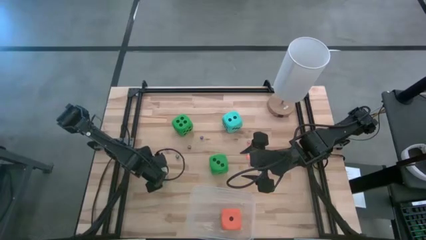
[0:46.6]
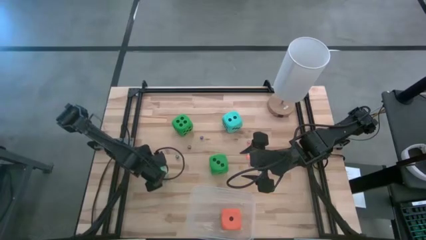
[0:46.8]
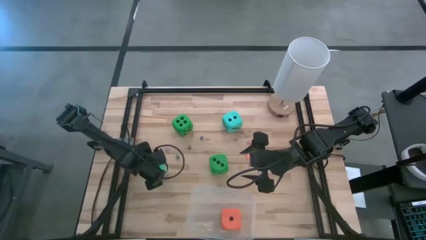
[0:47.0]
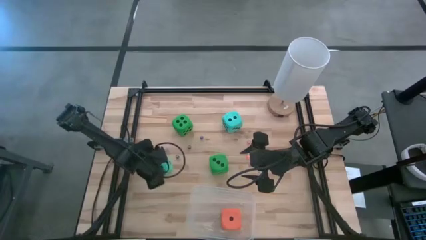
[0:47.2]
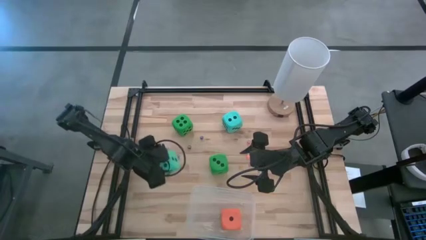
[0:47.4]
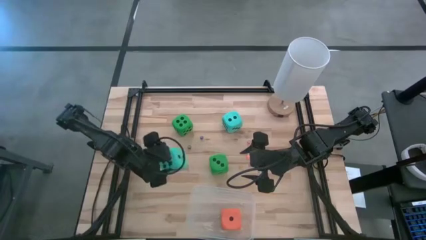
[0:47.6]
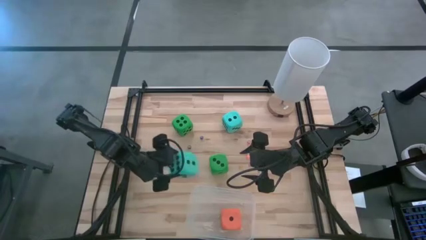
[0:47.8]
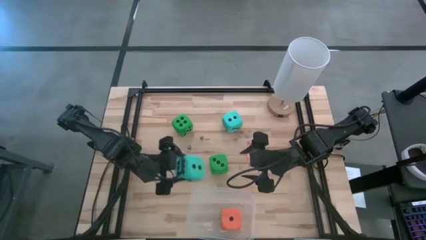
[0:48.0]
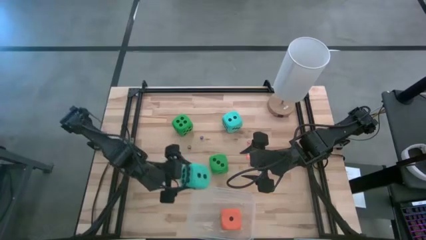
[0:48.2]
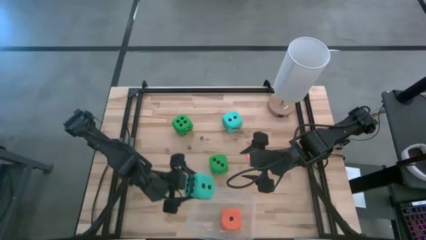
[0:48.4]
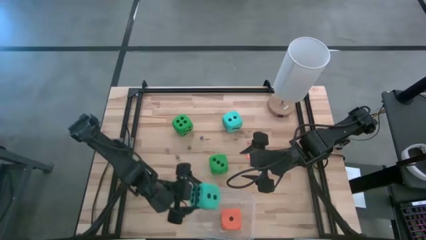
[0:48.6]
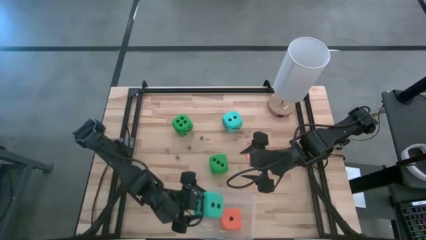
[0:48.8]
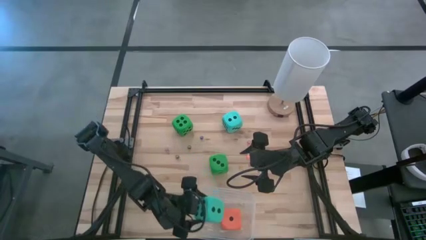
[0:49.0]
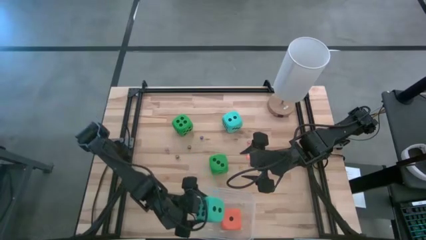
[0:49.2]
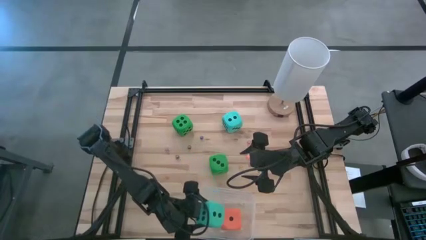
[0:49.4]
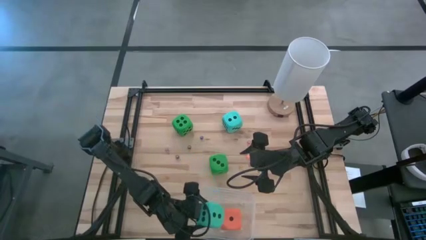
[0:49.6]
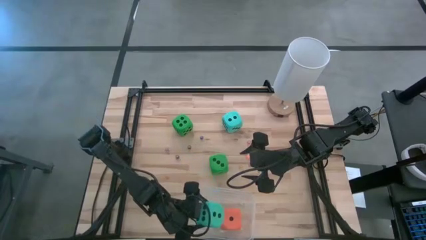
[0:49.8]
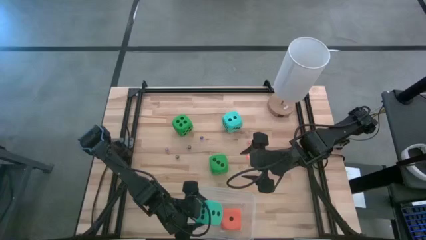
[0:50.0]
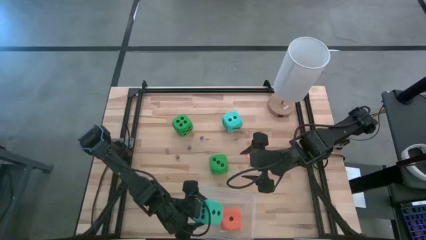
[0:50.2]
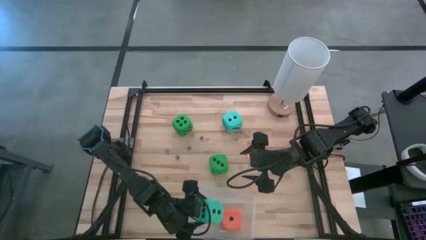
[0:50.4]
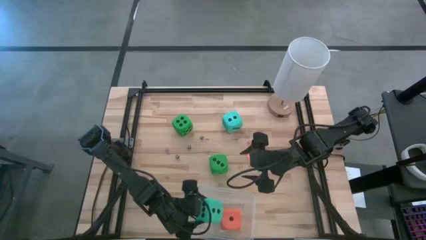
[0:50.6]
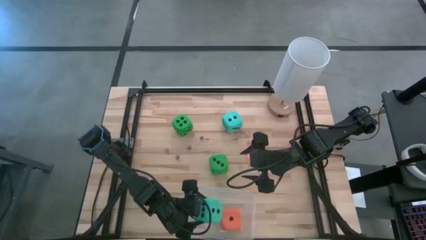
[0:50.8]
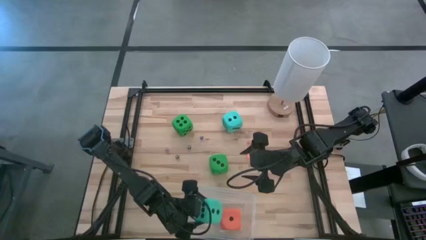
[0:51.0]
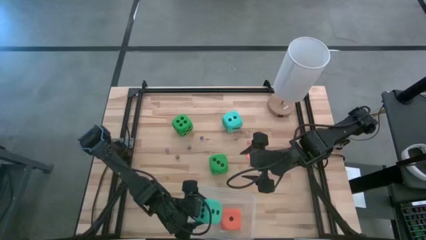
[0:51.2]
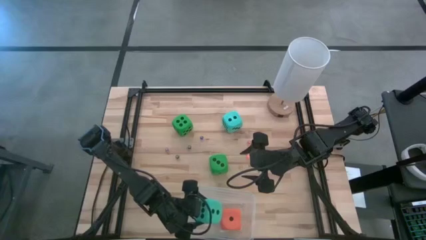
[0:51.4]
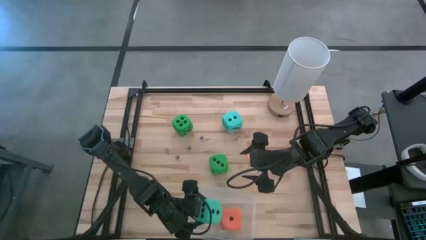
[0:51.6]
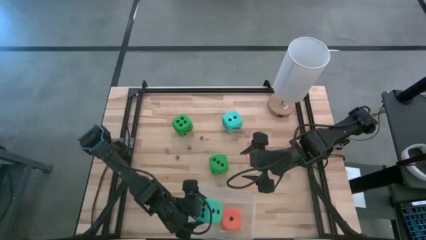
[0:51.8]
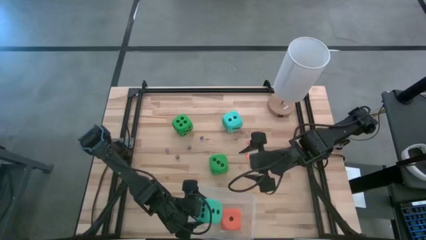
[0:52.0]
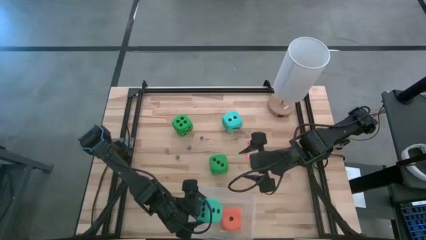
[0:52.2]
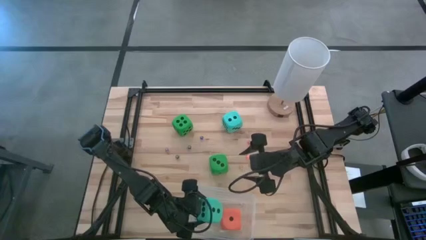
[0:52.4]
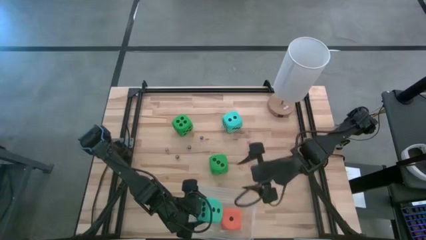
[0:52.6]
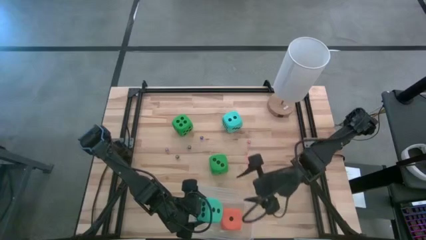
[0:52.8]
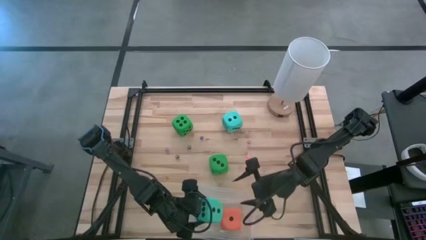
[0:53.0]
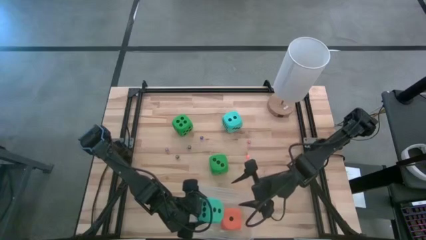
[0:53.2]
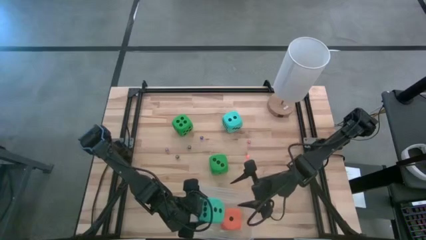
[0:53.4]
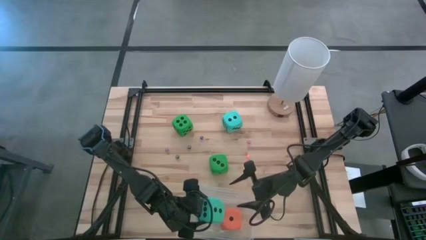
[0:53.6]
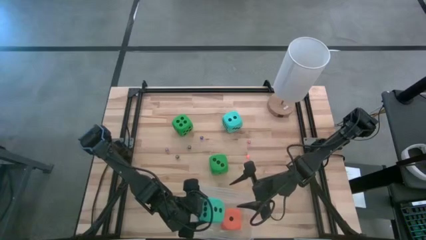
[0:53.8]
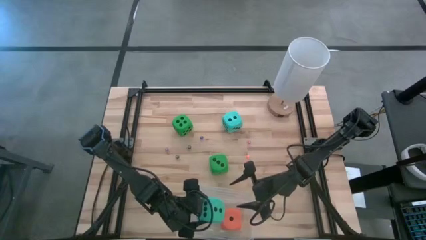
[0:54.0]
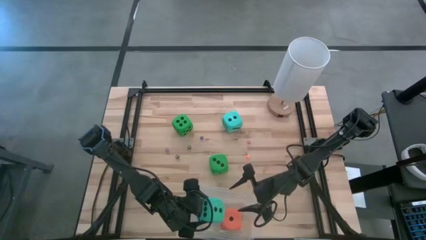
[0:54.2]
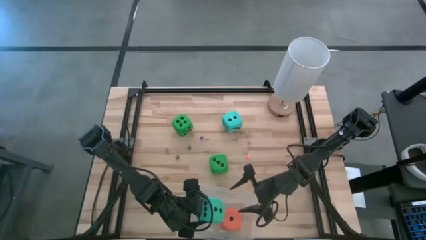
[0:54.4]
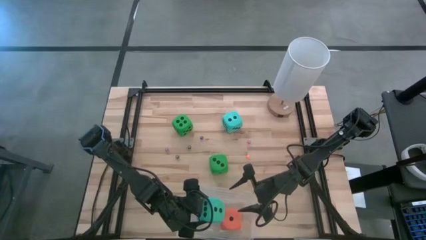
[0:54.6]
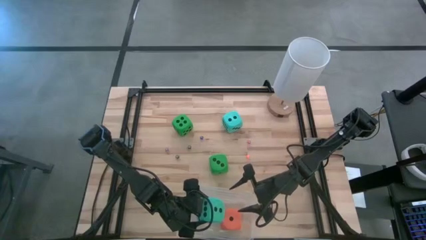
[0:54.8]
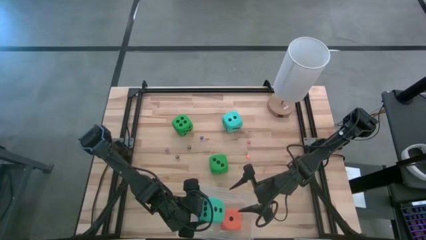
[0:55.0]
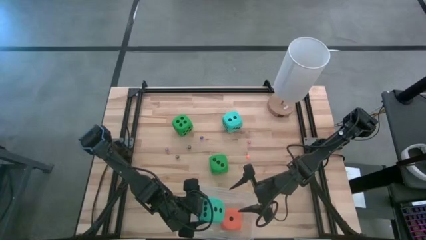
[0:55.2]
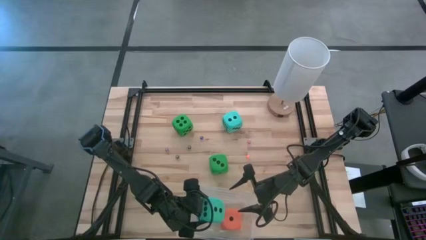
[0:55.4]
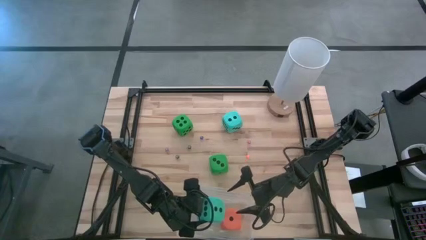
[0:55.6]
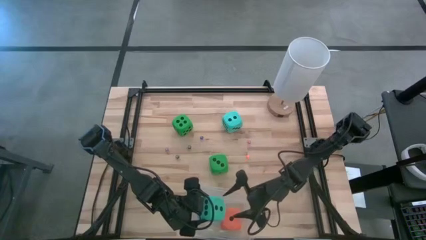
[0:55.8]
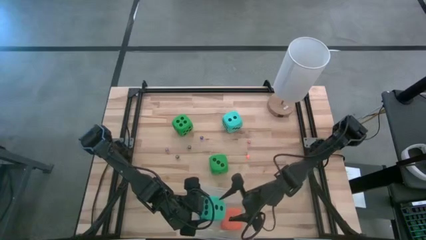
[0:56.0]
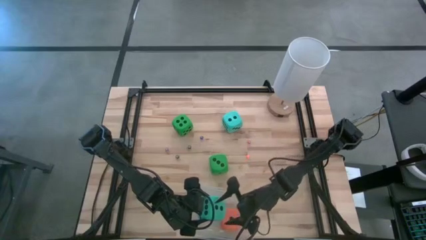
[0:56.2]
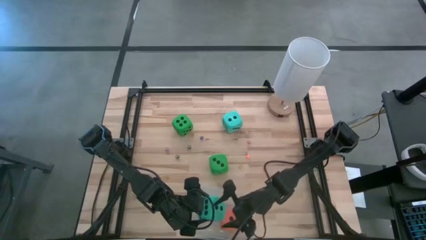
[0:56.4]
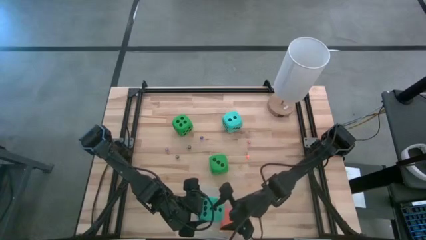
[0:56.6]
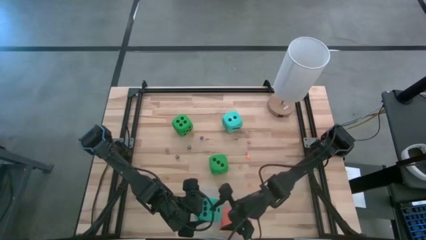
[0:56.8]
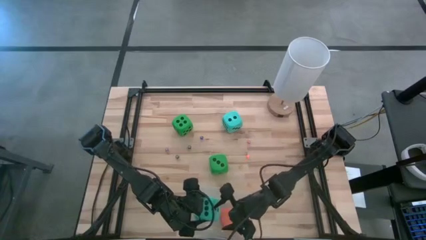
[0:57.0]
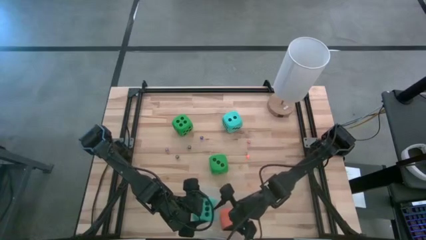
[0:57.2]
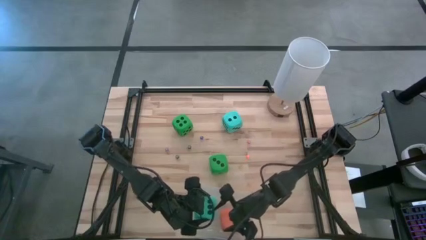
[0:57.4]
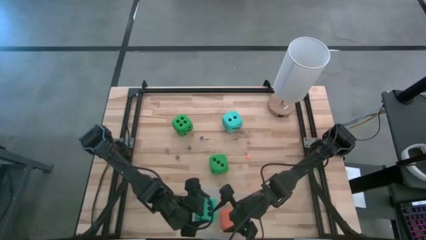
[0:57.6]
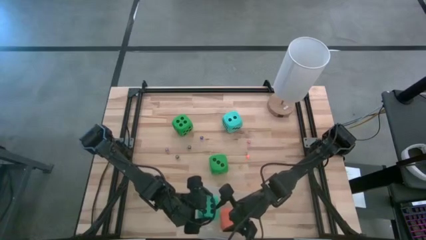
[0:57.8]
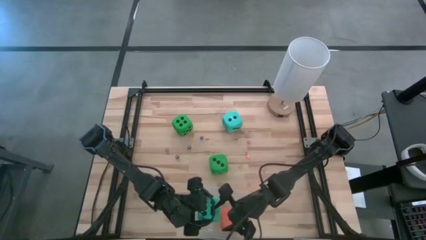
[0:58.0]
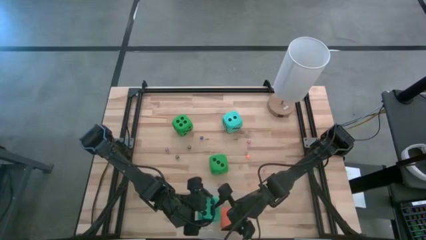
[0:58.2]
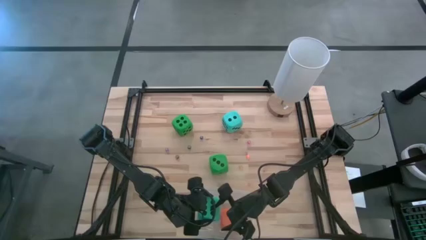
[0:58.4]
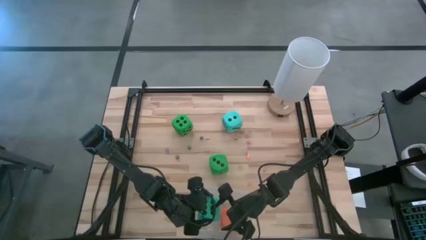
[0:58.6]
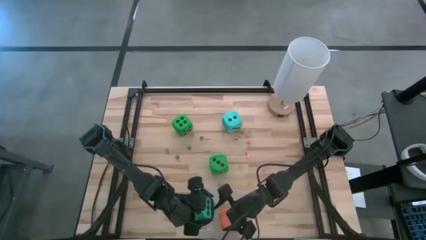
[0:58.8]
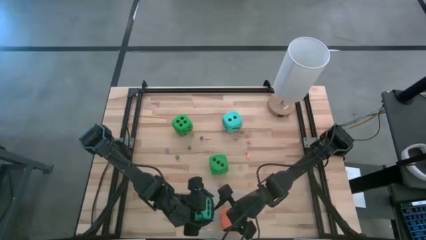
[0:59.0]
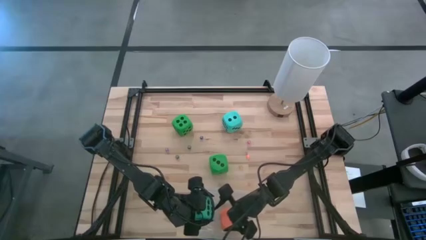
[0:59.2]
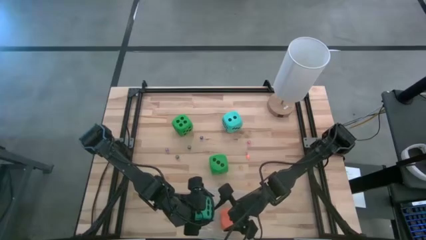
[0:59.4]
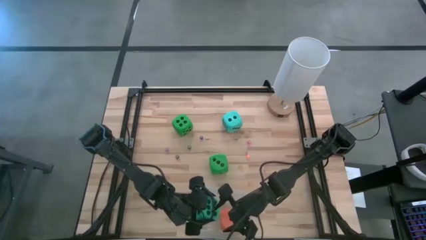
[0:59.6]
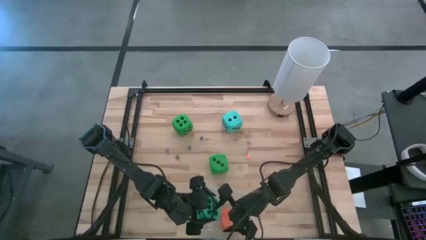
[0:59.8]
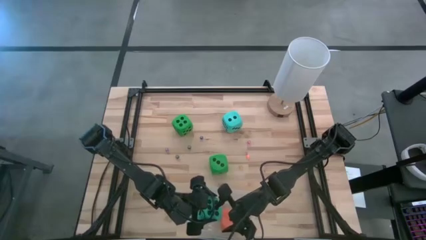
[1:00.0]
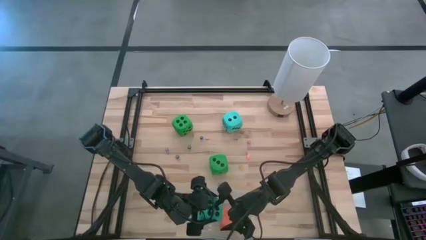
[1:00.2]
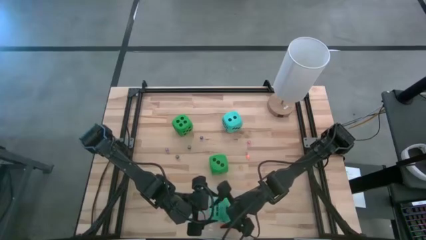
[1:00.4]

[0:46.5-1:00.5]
Task: Pick & Place Dice
Put the bottom large blue dice into the transparent bin

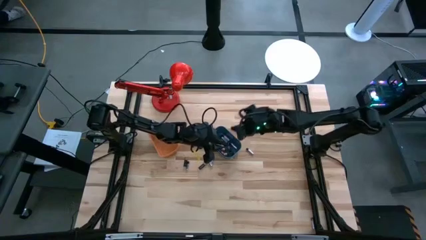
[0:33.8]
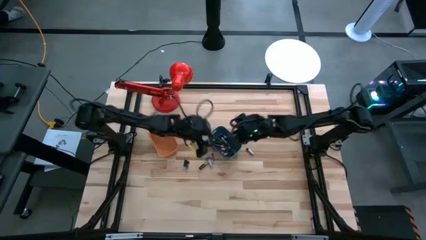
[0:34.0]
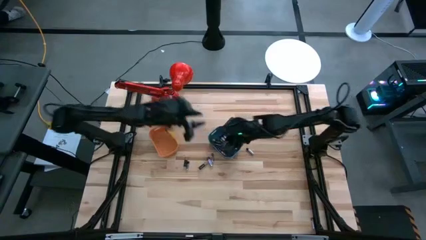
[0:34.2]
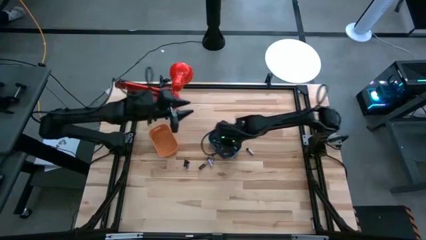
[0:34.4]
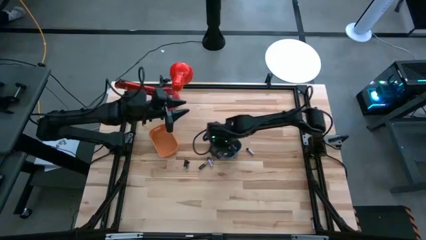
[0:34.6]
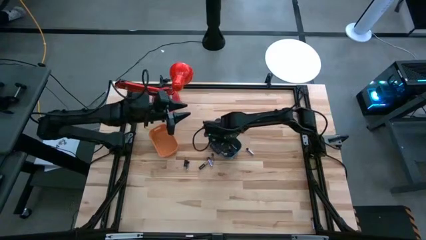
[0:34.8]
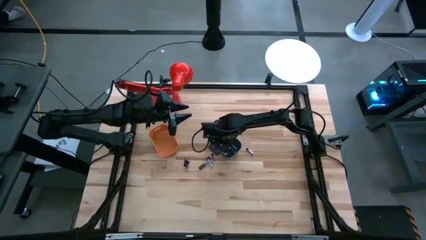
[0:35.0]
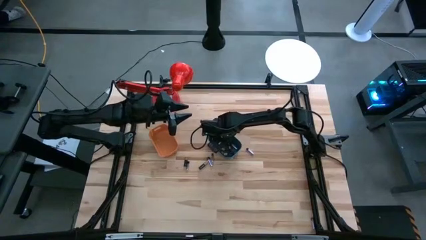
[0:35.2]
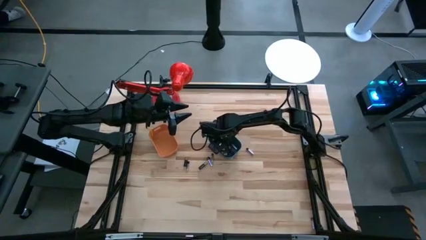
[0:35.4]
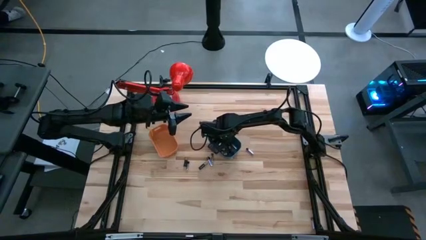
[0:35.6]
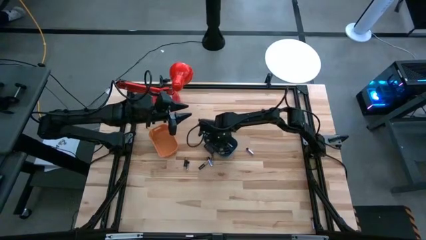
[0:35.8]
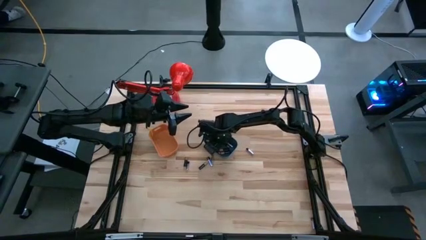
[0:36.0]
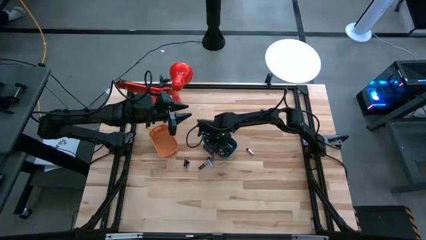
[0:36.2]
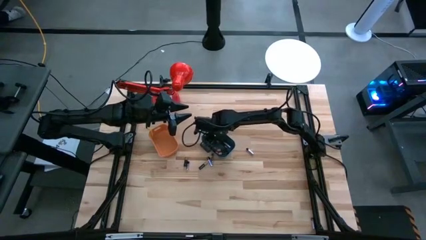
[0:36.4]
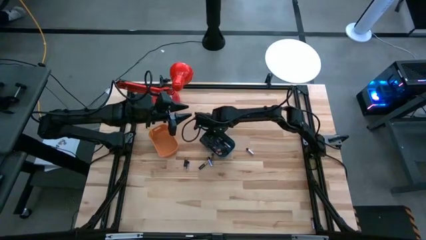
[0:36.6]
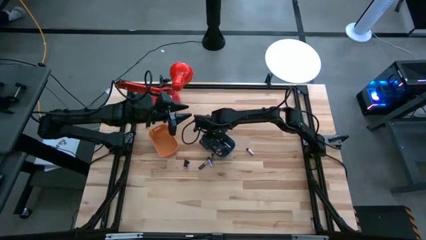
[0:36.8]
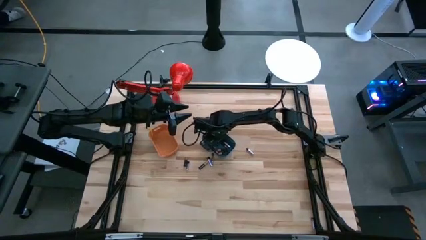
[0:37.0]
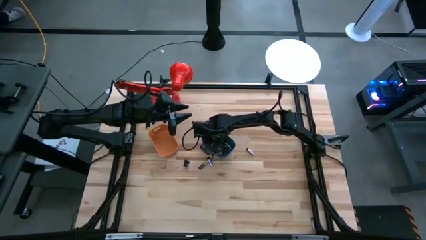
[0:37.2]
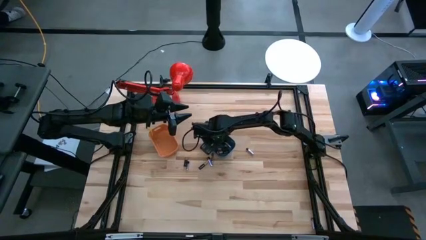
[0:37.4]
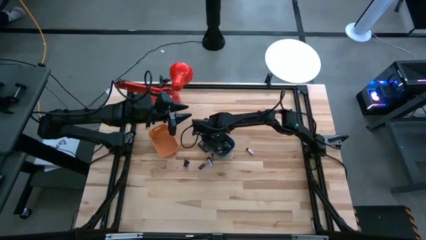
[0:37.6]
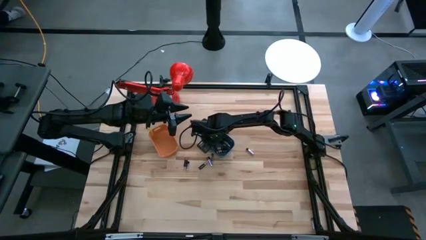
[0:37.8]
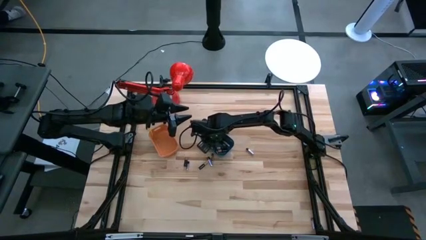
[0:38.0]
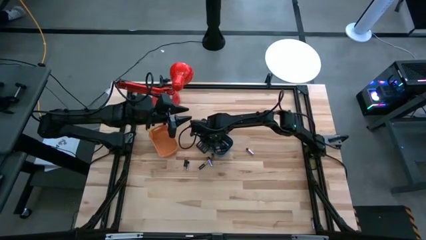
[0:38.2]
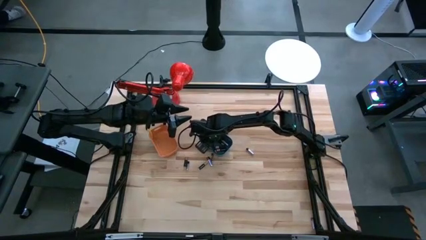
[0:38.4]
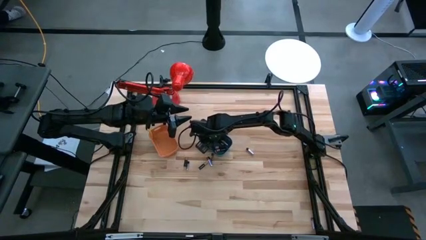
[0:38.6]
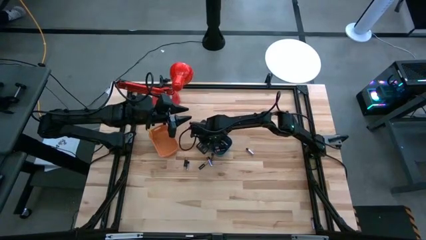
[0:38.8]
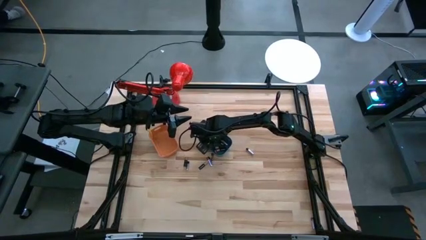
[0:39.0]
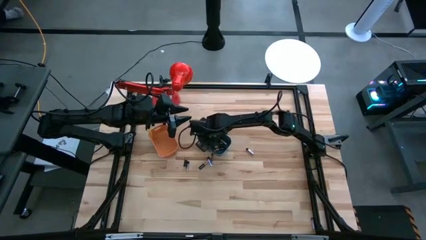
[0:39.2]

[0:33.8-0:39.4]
Task: Sort batteries
Put the silver battery from the blue bin into the orange bin
